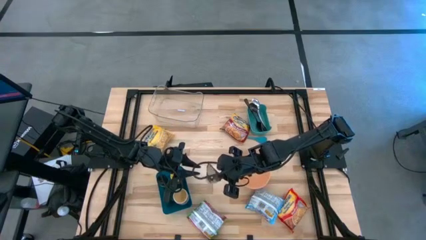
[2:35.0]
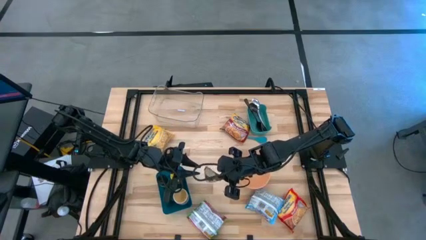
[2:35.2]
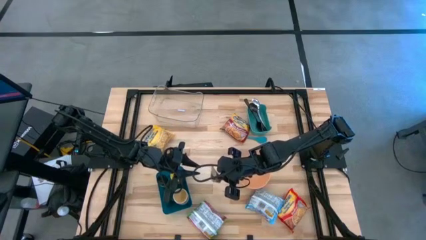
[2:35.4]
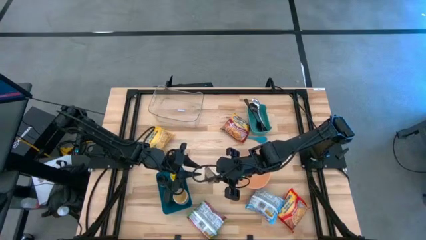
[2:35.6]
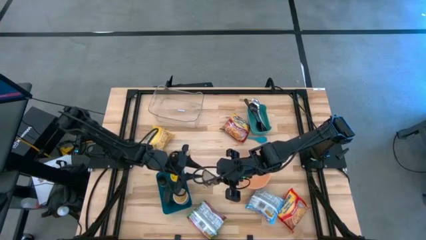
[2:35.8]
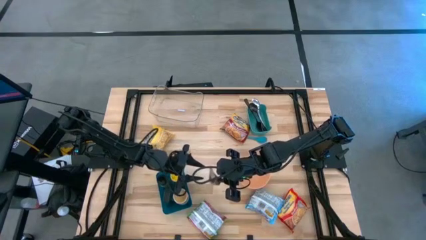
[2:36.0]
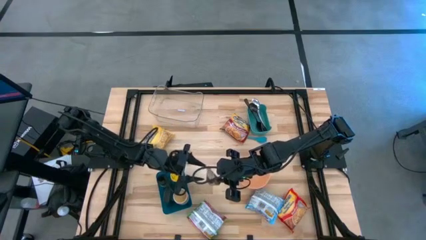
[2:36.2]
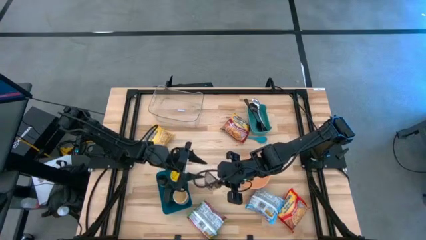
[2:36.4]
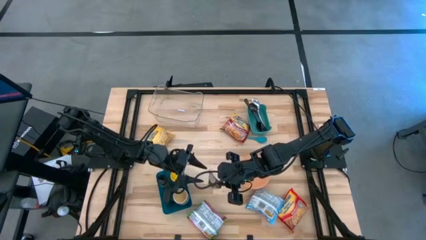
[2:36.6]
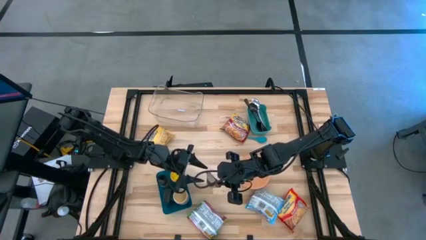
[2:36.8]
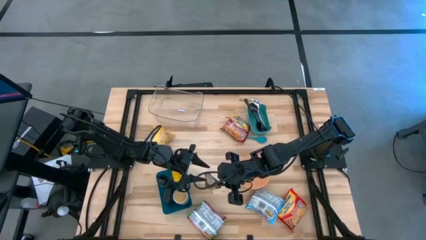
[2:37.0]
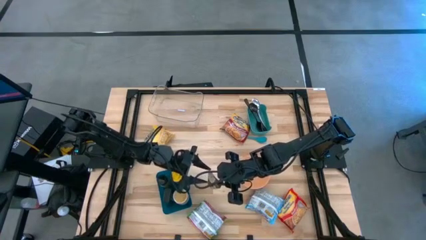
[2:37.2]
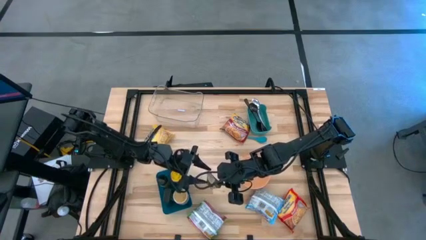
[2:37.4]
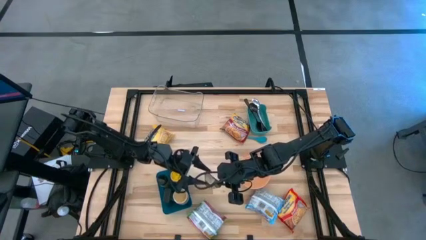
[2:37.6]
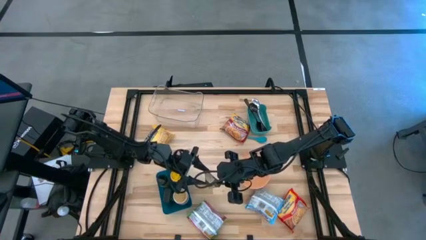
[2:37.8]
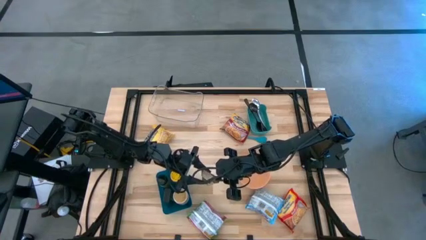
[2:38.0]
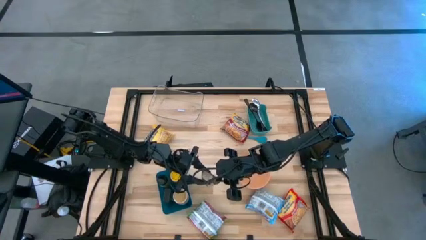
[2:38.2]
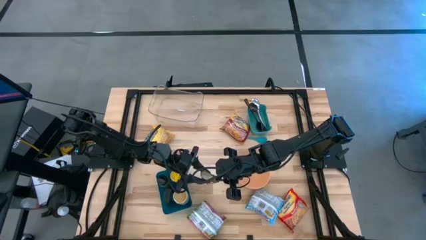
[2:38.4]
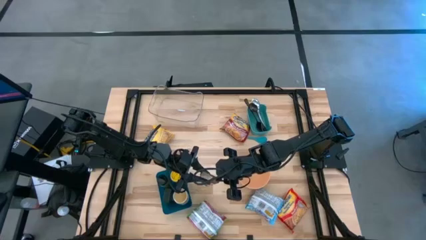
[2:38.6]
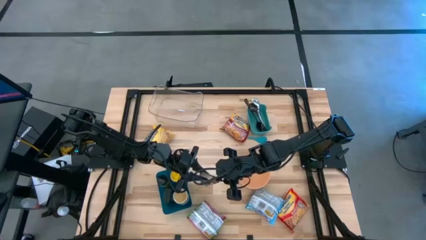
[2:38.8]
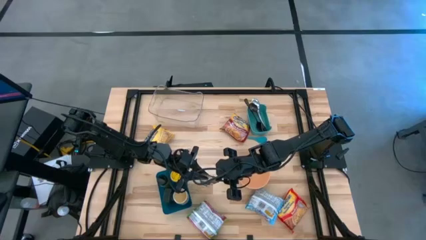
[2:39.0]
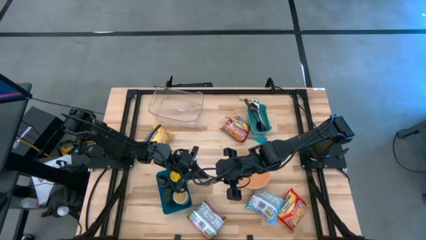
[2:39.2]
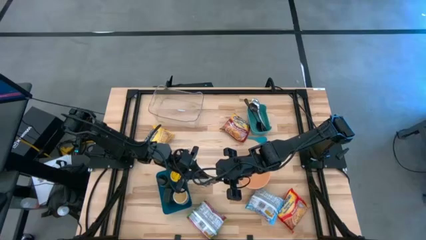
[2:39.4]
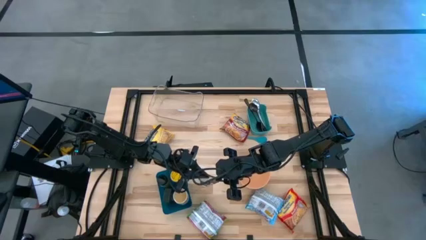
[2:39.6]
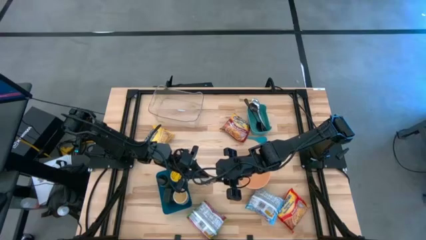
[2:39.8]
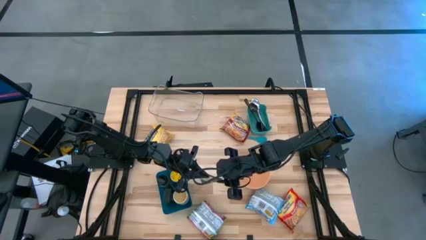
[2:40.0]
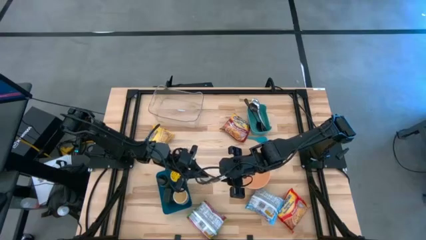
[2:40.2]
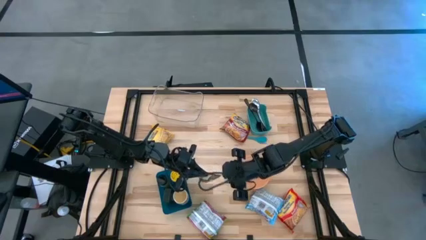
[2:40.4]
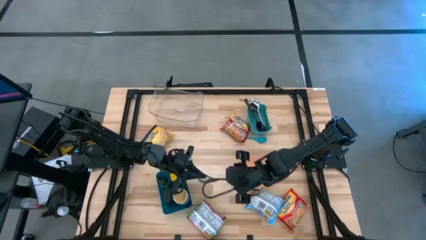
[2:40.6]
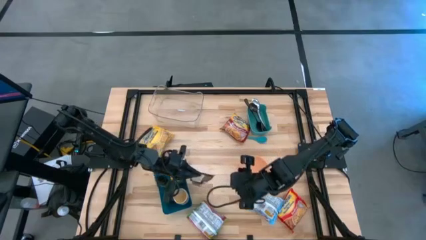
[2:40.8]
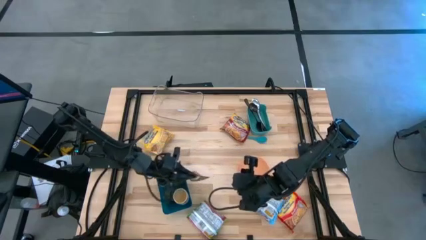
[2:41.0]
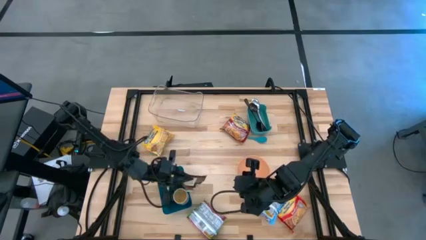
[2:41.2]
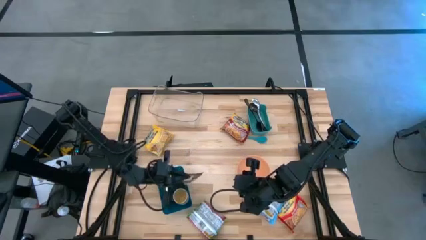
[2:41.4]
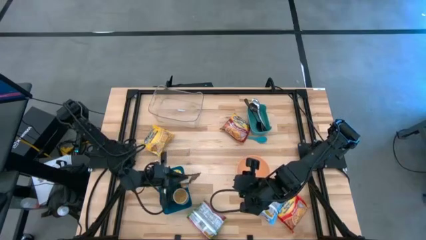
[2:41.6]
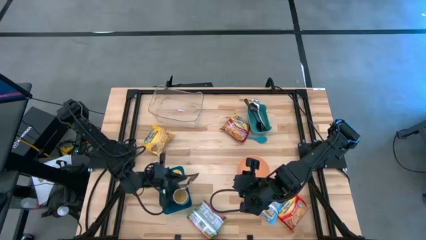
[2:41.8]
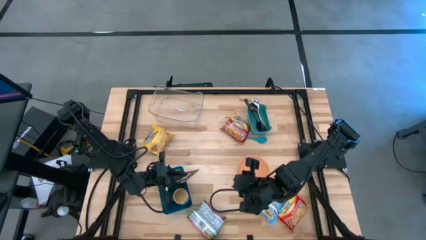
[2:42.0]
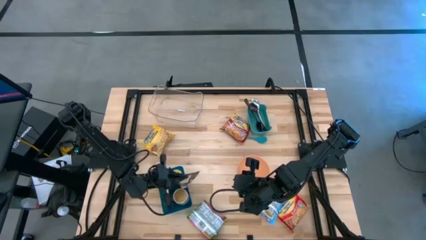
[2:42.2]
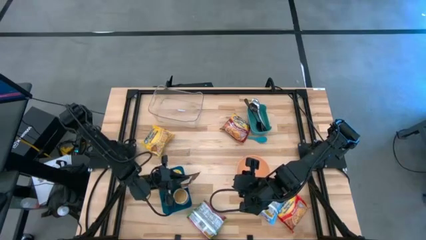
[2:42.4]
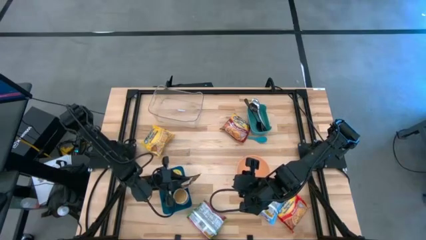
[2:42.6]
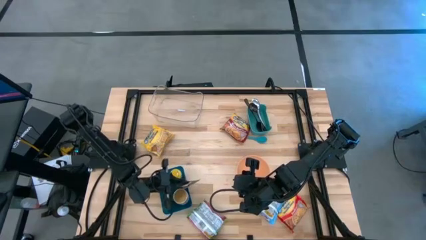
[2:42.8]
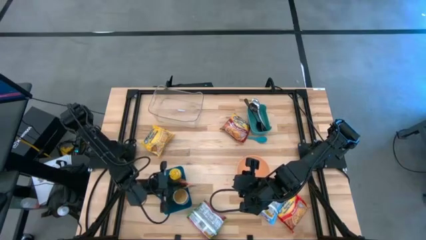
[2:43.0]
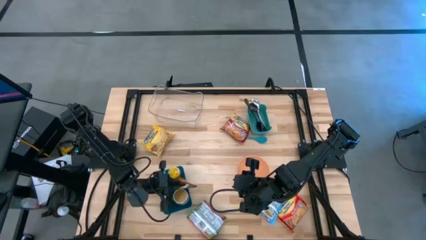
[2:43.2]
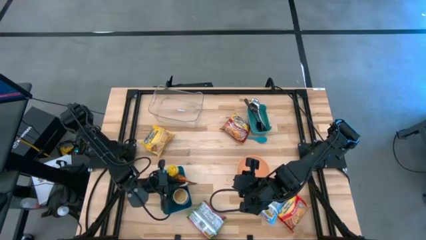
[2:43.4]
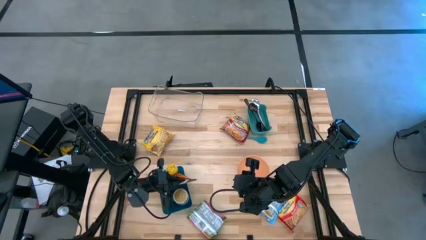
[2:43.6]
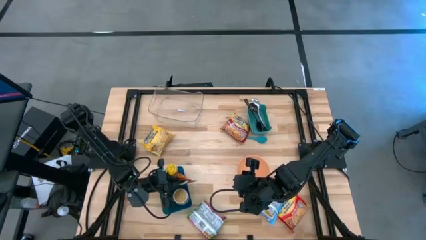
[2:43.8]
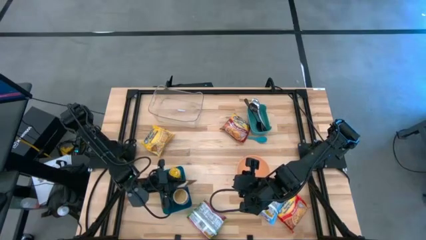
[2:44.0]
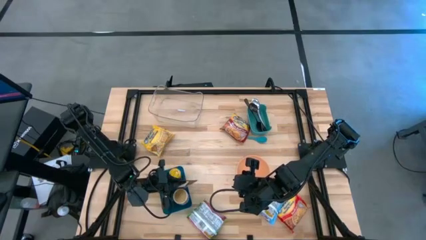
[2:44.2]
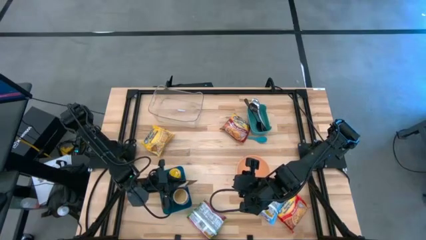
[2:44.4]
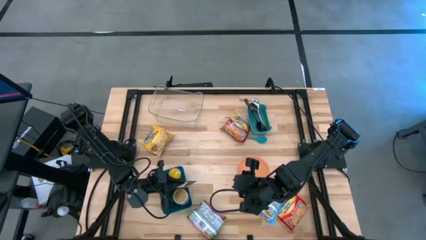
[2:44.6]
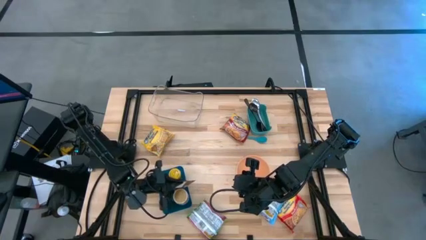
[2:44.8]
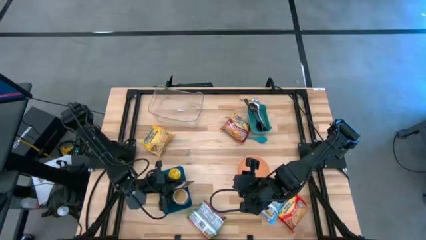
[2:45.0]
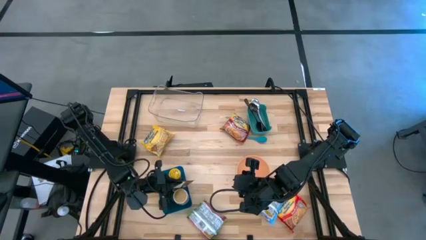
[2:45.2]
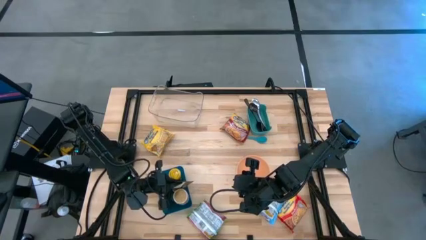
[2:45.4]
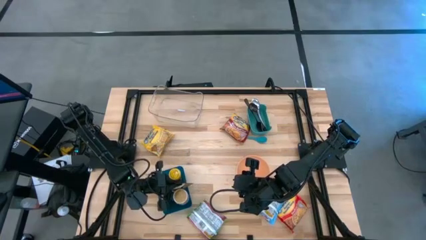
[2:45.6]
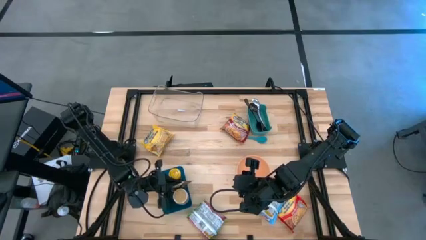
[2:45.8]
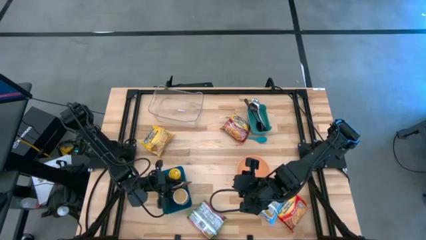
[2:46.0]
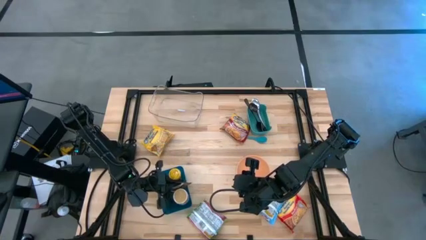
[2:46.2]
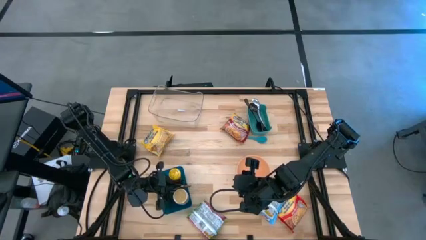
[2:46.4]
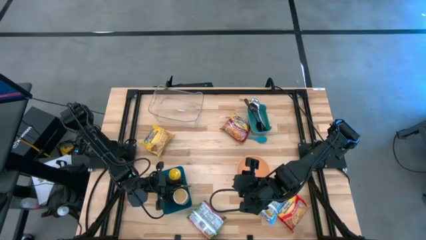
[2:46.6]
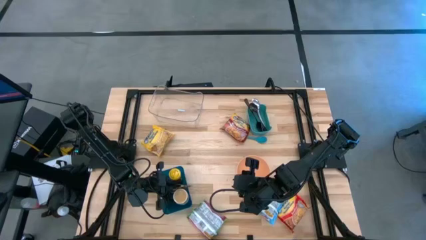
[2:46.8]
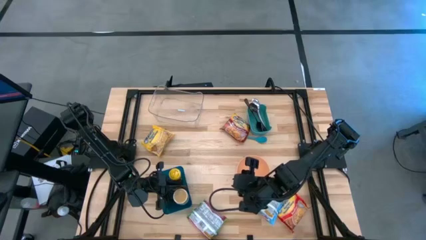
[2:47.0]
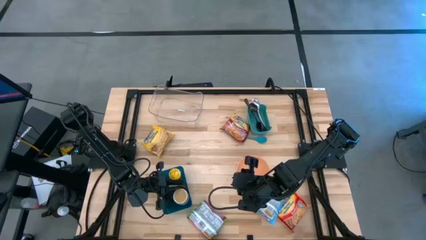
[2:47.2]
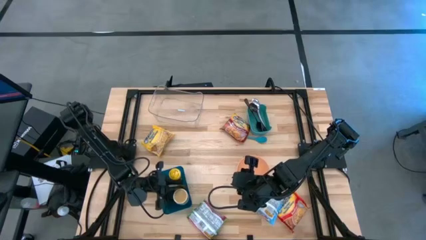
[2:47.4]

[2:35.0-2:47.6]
Task: Pick & Place Food Item
Put the orange seasoning pack into the blue bin
